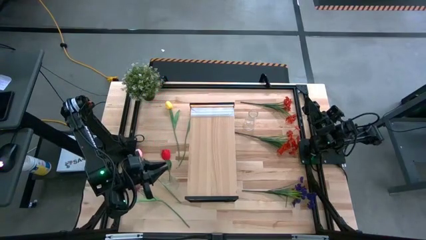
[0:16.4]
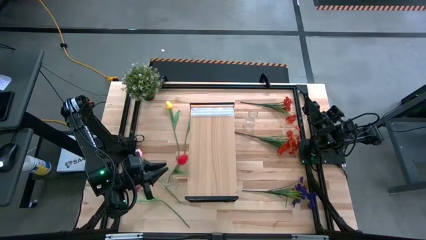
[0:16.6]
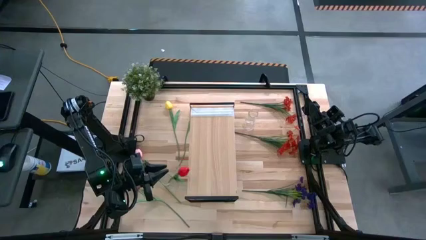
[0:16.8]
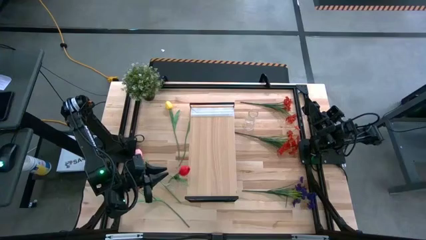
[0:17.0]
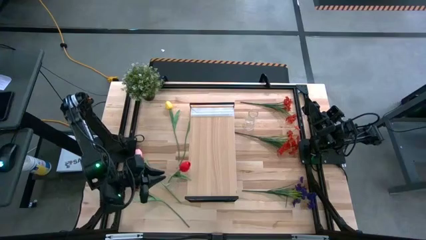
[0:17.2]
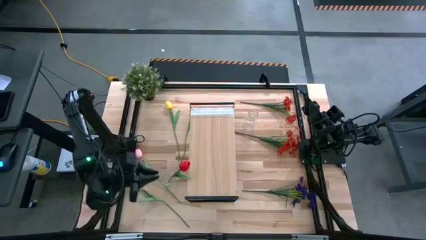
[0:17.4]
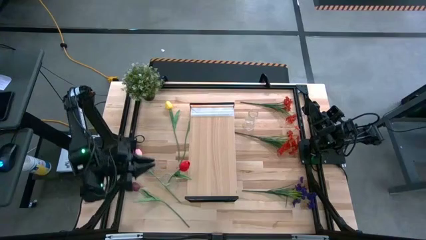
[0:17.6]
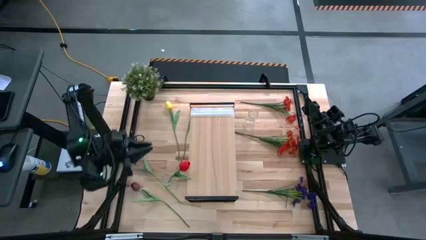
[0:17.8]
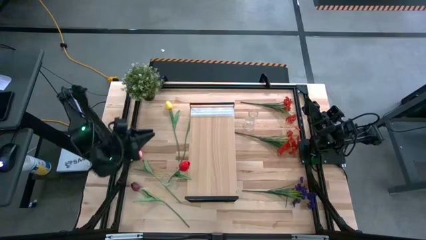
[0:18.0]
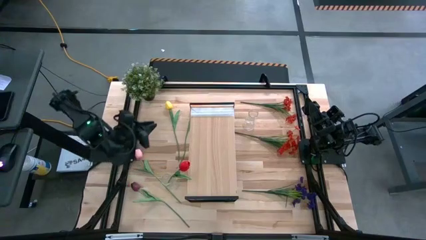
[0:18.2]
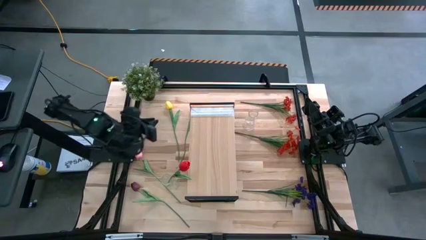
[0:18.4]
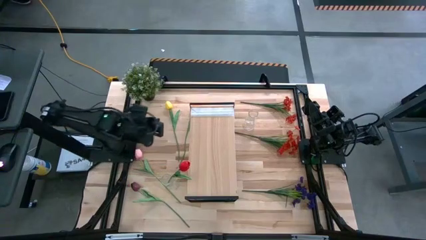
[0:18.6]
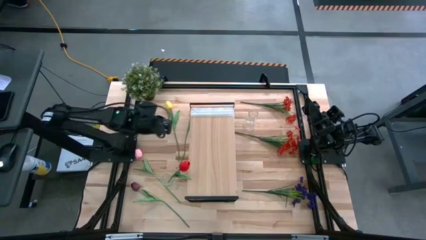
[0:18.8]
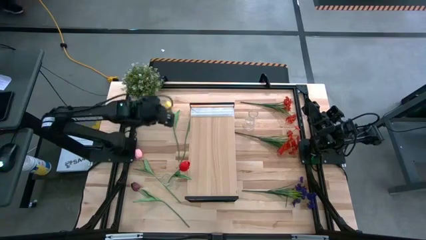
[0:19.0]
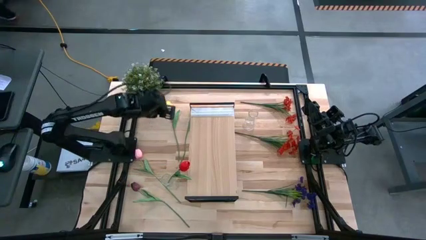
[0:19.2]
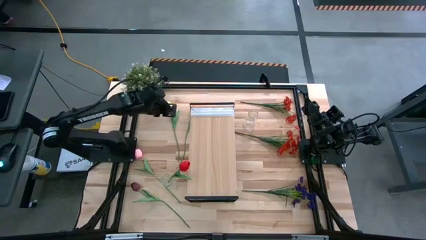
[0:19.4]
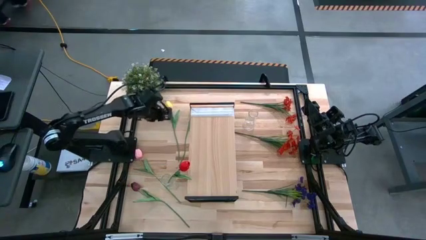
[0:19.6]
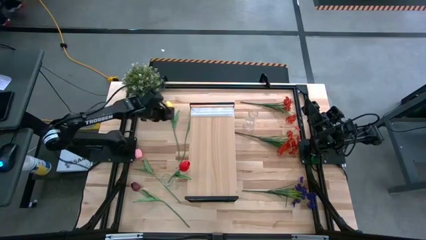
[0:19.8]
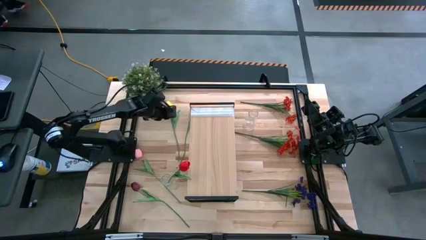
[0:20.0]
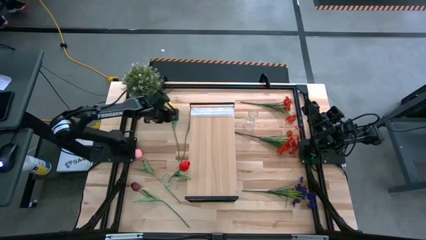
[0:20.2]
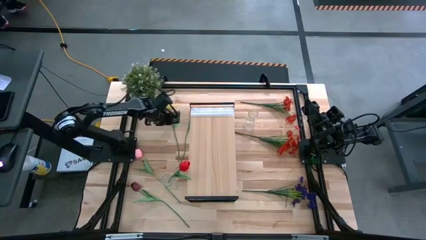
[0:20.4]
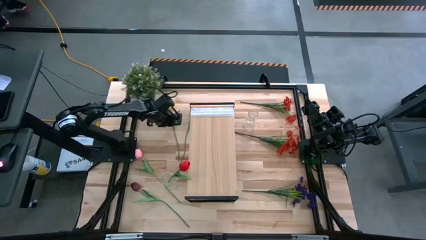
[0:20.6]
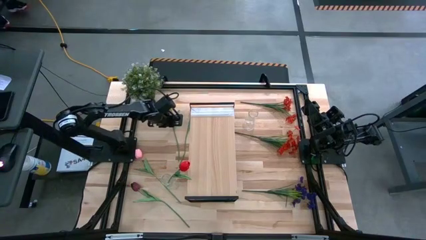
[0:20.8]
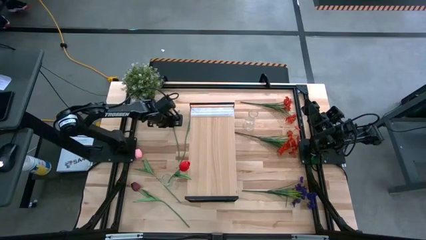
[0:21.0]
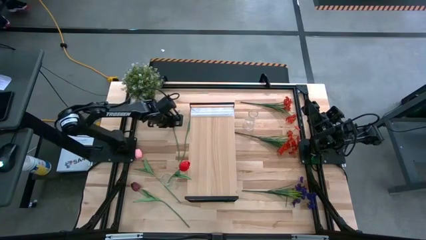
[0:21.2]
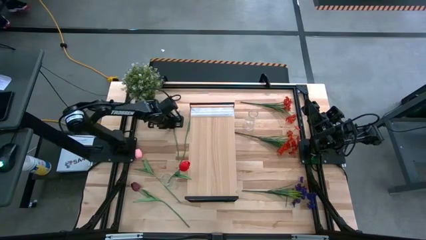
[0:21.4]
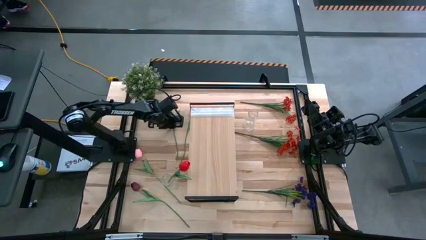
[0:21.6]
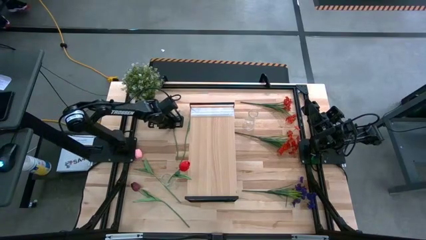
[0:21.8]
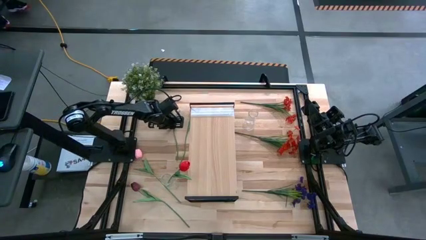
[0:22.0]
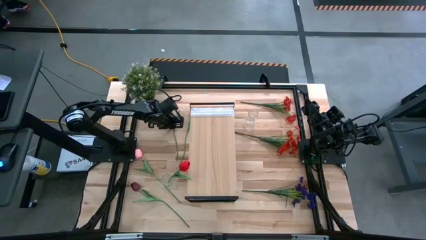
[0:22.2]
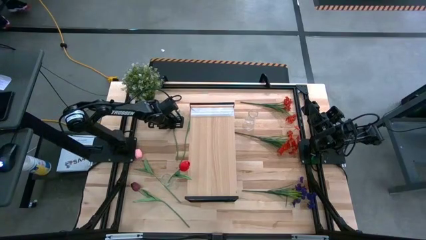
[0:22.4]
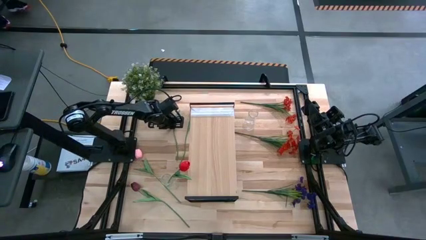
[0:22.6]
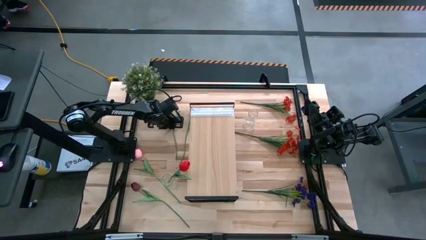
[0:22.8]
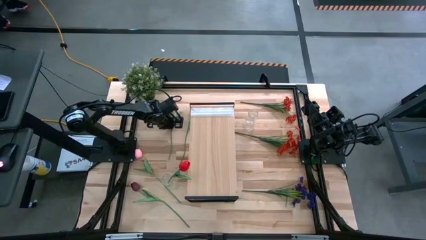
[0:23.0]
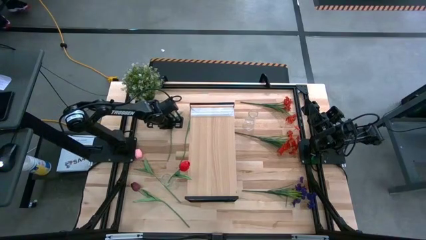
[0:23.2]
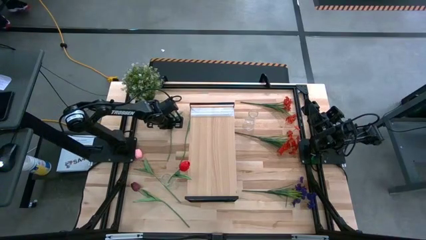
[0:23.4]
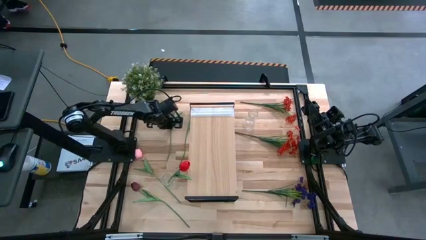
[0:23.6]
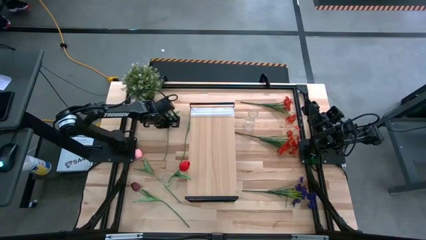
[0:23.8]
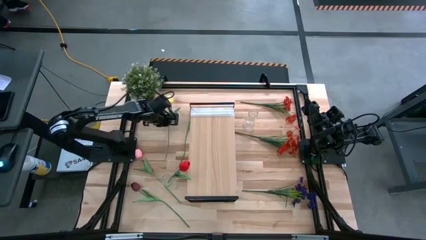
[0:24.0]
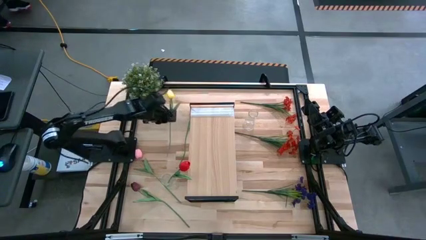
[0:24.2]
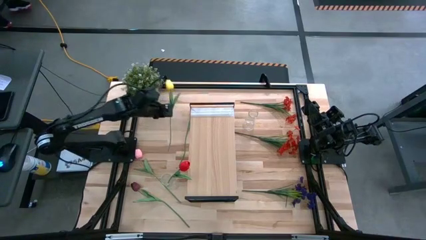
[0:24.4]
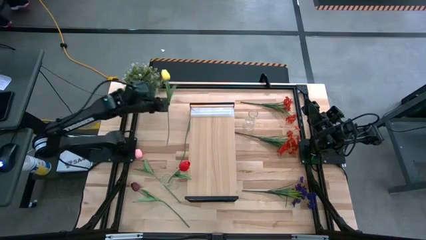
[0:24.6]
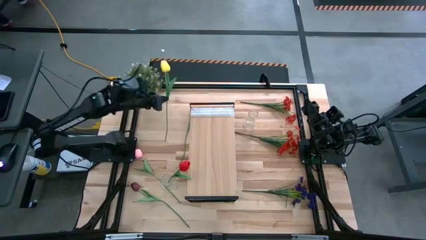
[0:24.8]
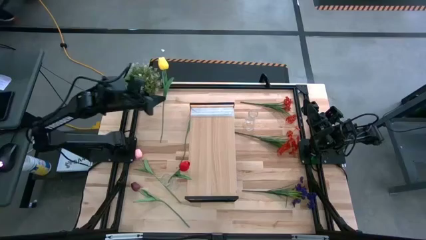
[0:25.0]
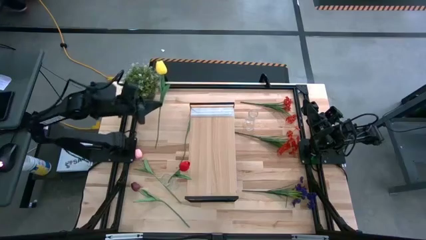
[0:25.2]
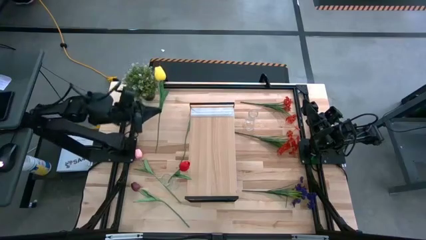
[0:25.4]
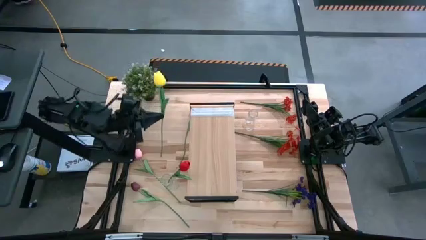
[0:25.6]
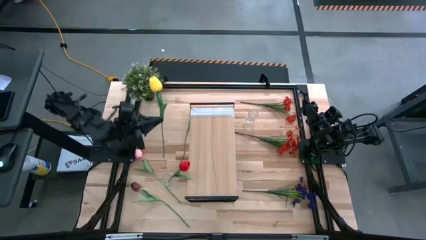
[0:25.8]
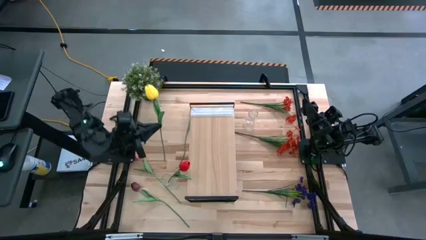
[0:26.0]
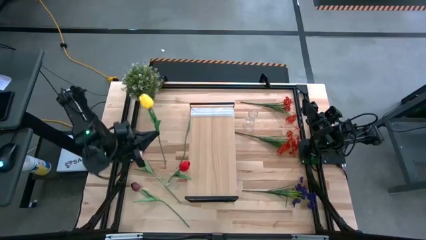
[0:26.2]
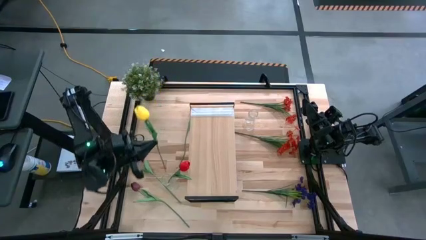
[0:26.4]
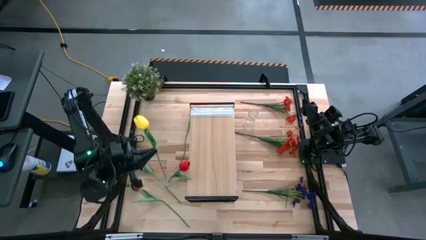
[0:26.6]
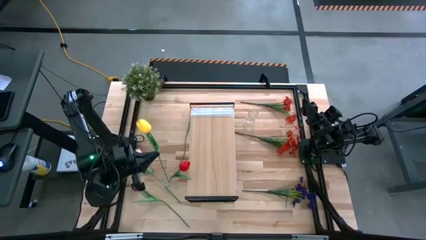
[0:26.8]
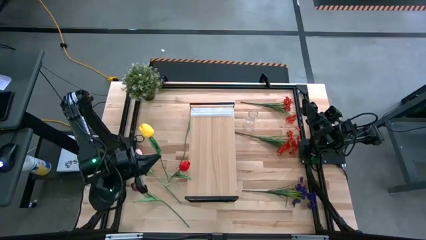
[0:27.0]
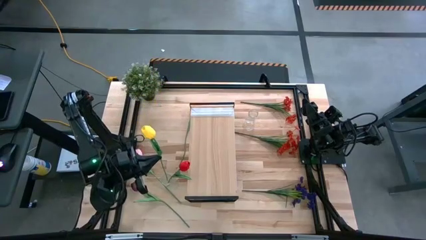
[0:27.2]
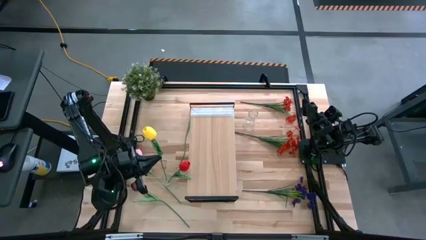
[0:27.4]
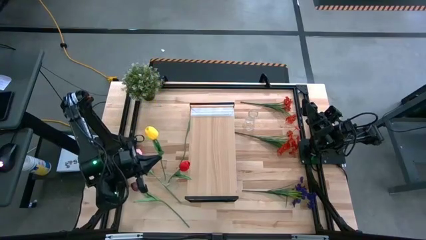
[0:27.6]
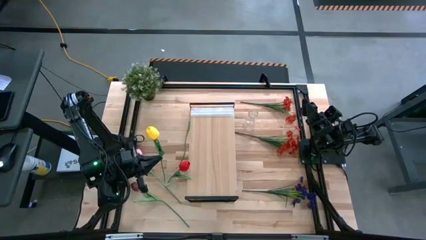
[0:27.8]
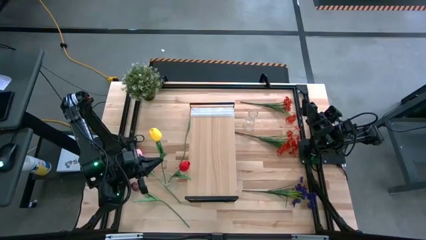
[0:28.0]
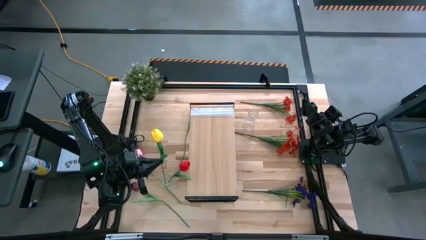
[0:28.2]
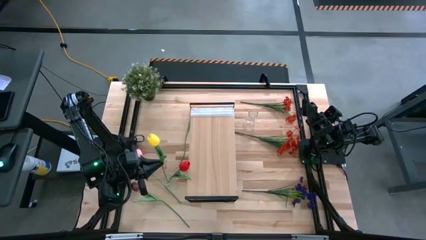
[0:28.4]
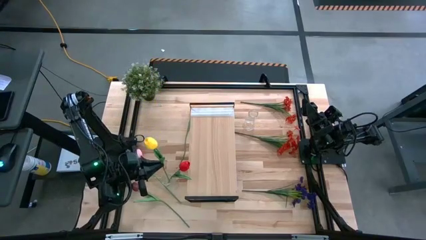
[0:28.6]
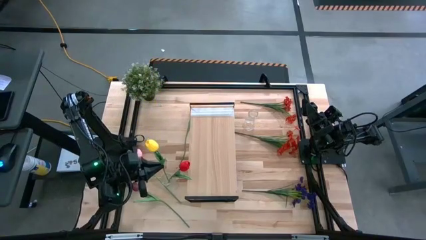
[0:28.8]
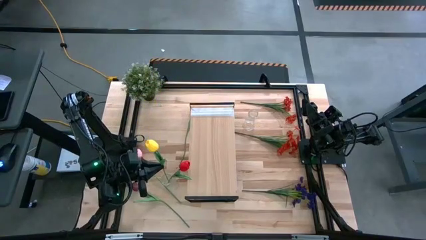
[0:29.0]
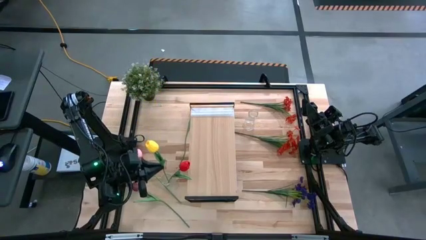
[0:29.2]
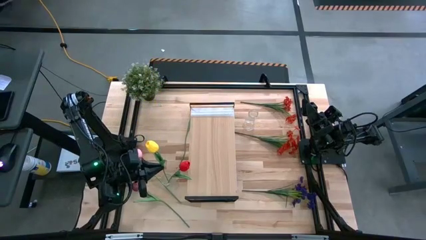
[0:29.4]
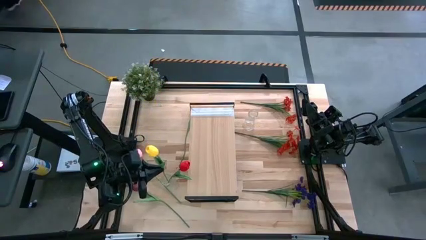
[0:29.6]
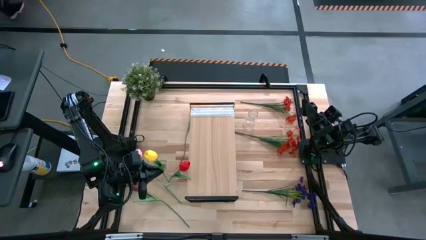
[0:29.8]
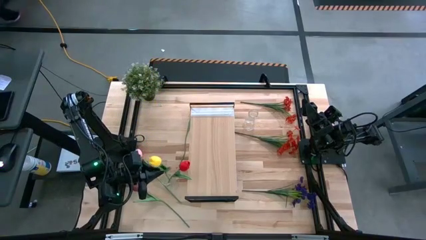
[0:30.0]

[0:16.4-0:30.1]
Task: Pick and place flowers into a vace then onto a shelf
Put the yellow tulip into the bottom vase

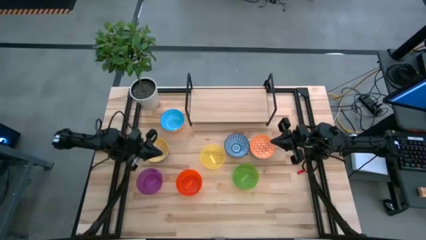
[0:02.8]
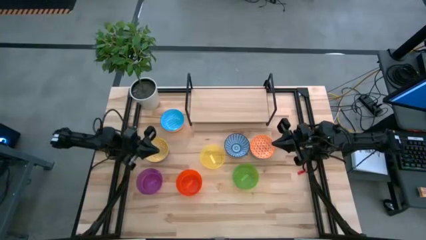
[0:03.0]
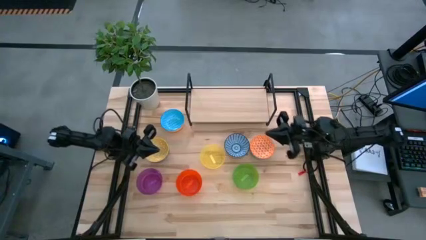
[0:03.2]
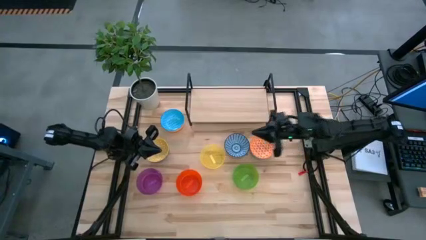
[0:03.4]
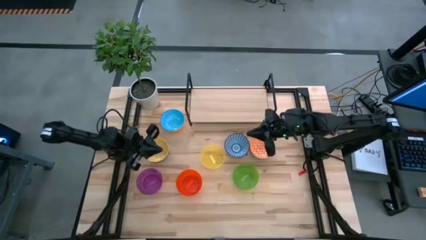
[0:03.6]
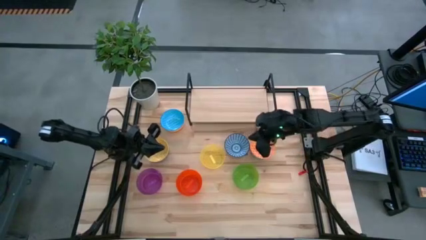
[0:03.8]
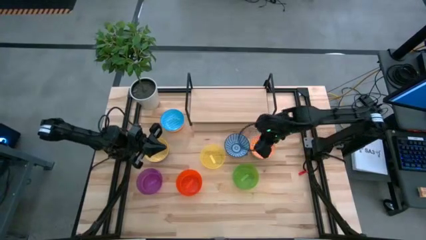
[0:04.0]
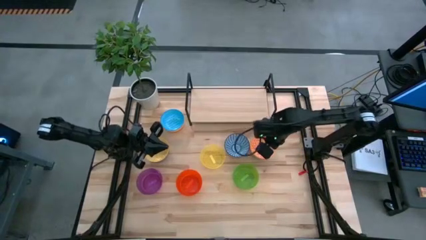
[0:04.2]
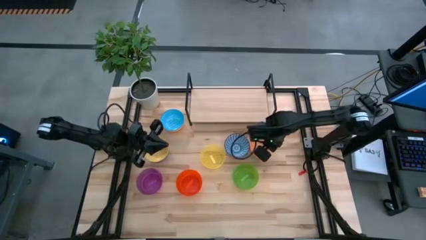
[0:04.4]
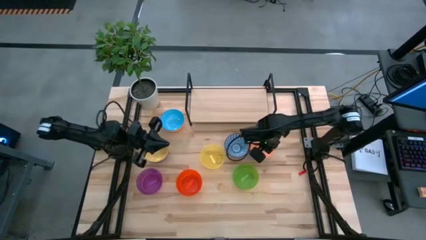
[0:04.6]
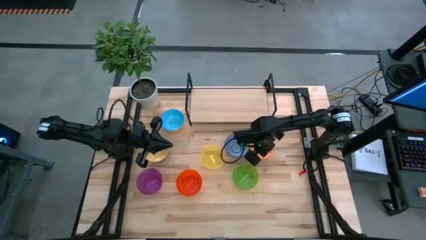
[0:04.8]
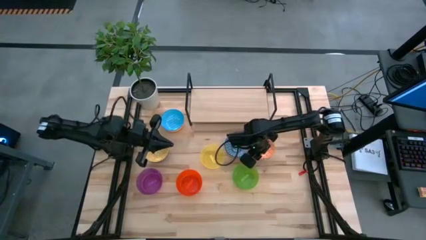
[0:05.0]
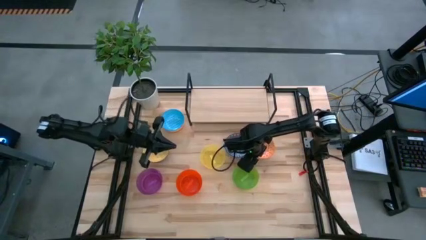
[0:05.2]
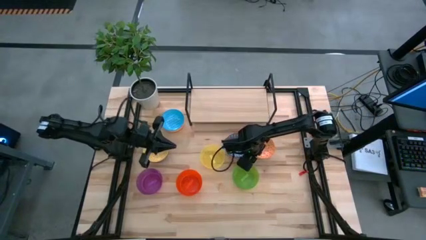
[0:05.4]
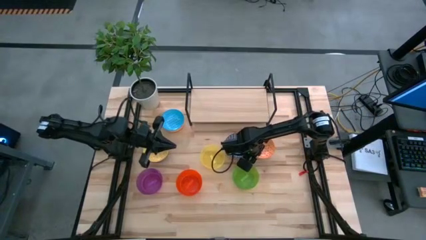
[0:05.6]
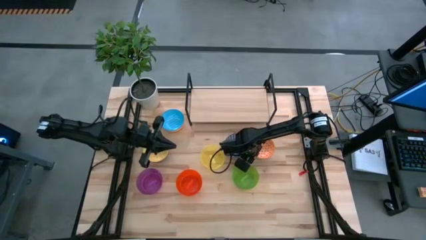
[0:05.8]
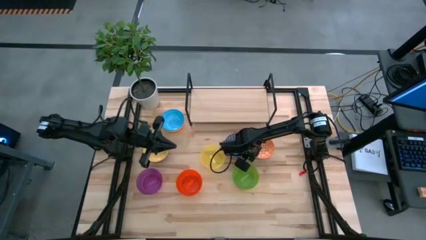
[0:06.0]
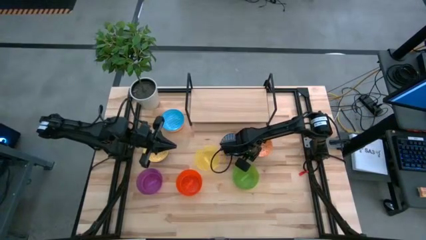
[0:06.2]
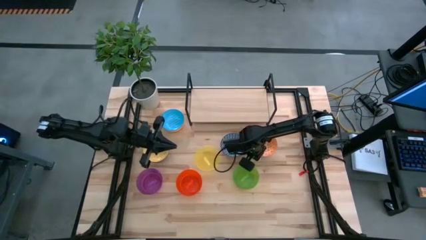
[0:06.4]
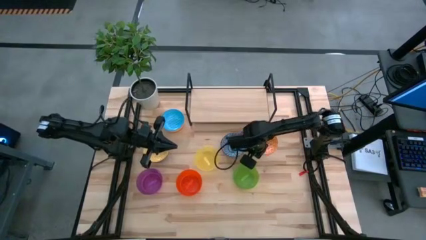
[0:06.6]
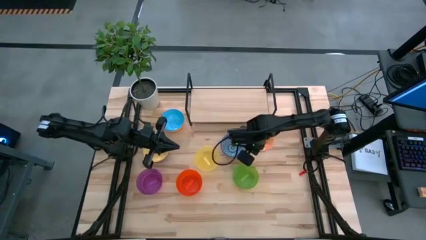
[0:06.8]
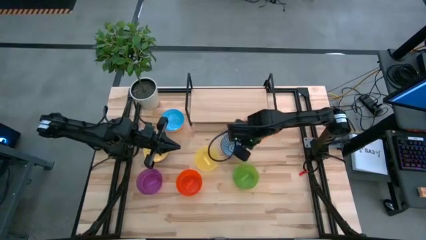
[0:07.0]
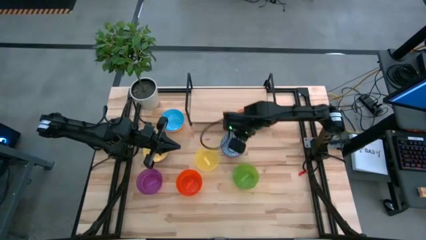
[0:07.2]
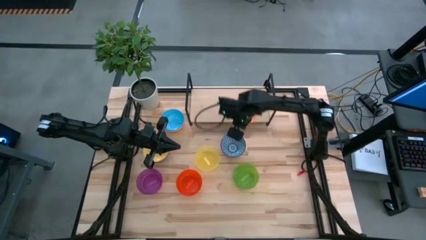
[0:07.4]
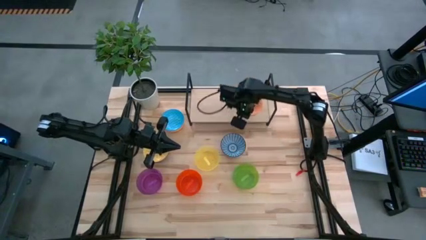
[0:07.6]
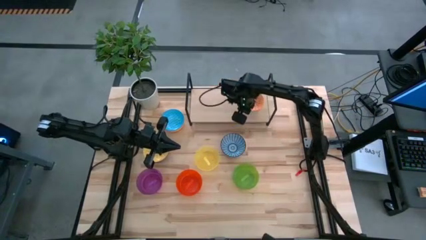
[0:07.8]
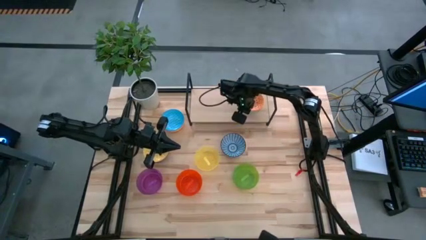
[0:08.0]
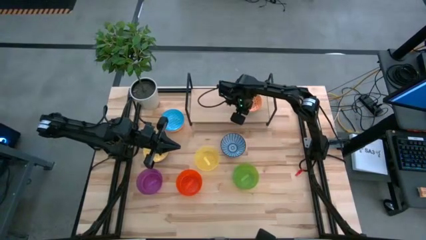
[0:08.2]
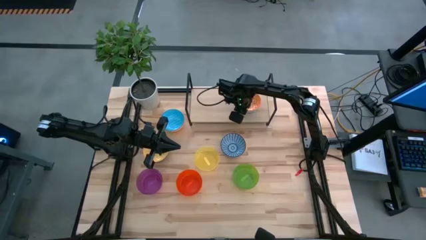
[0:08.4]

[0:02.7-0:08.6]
Task: Place and stack bowls onto a shelf
Put the orange patterned bowl on the shelf
